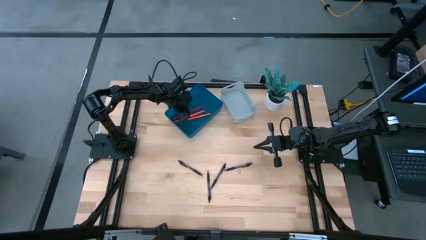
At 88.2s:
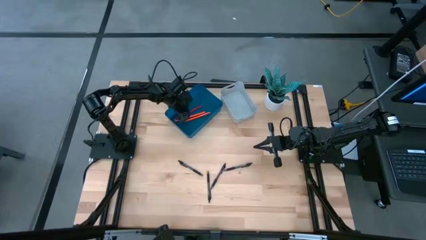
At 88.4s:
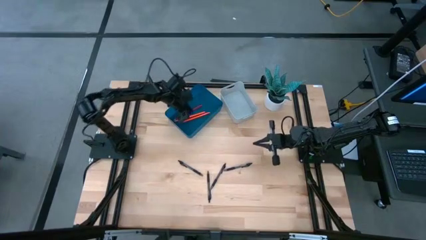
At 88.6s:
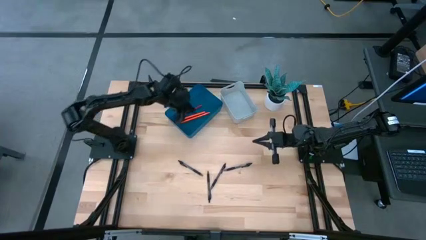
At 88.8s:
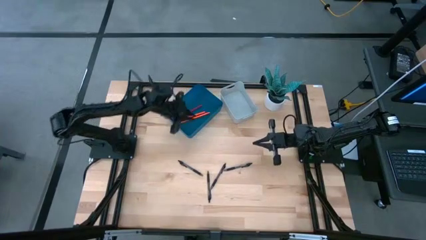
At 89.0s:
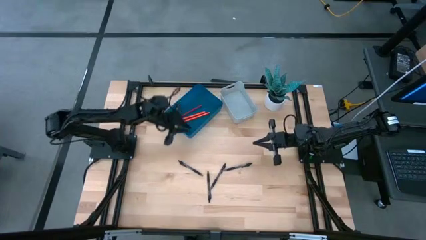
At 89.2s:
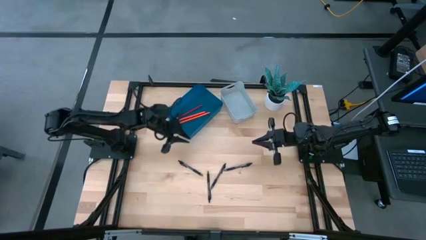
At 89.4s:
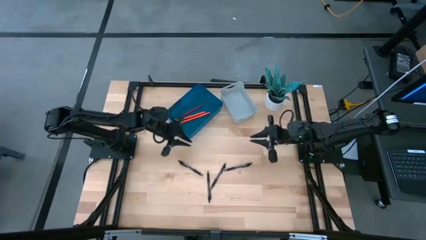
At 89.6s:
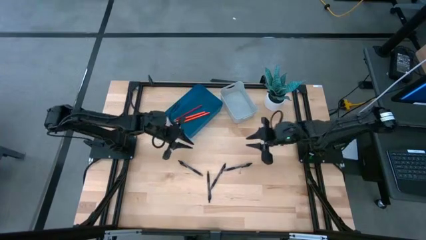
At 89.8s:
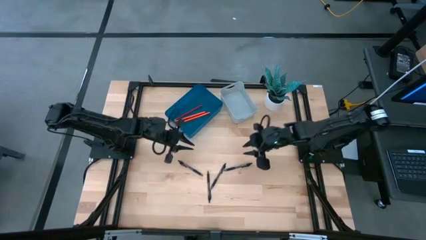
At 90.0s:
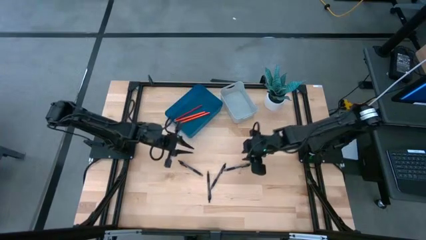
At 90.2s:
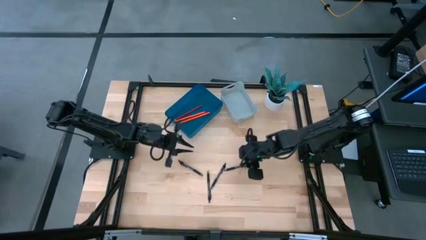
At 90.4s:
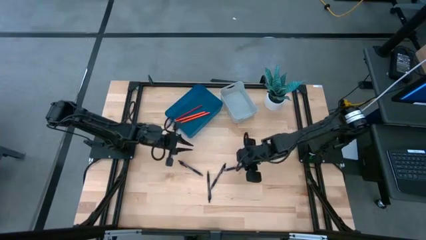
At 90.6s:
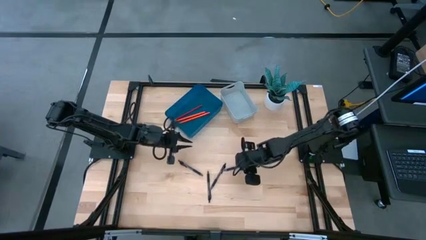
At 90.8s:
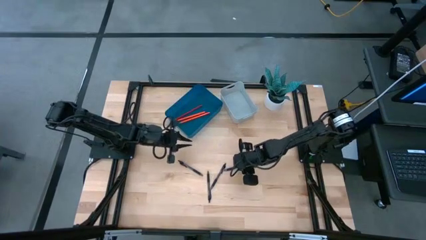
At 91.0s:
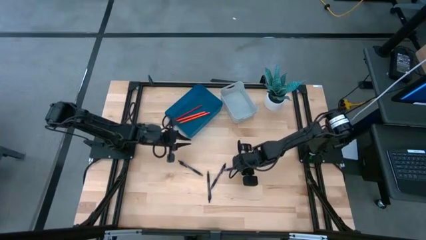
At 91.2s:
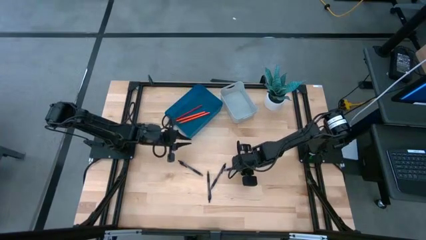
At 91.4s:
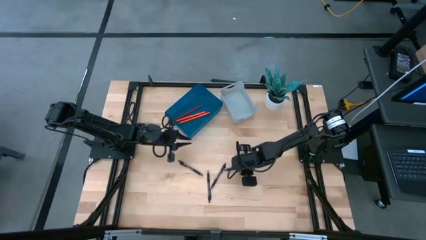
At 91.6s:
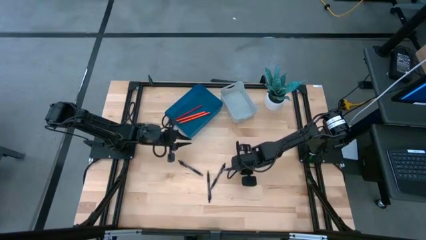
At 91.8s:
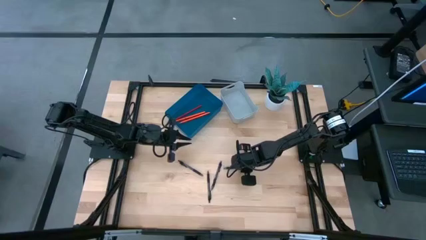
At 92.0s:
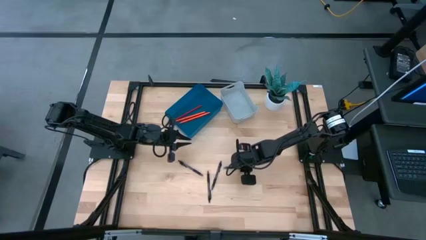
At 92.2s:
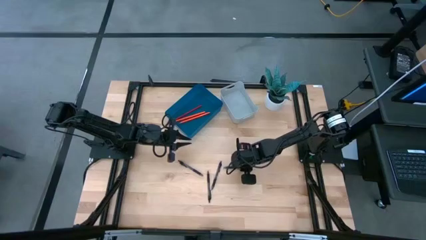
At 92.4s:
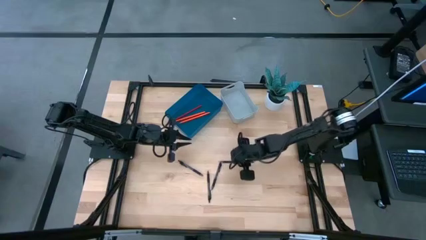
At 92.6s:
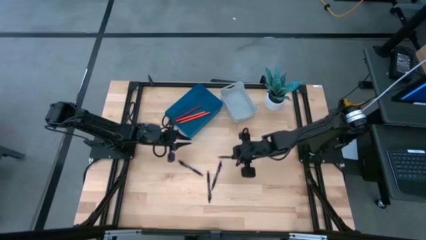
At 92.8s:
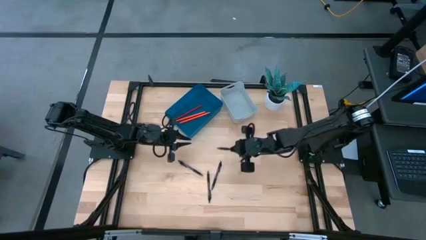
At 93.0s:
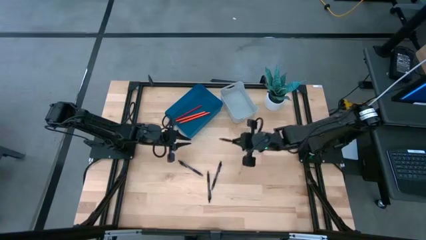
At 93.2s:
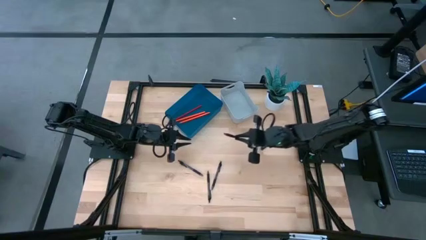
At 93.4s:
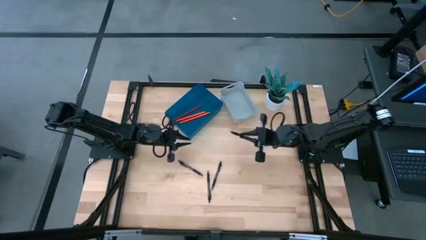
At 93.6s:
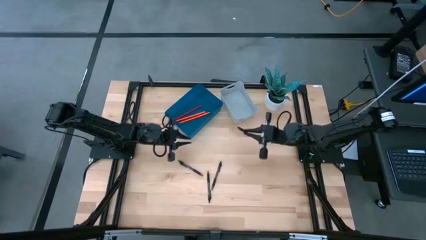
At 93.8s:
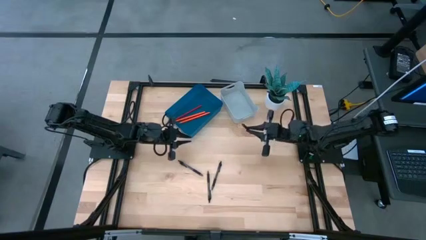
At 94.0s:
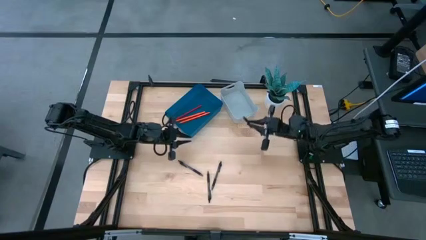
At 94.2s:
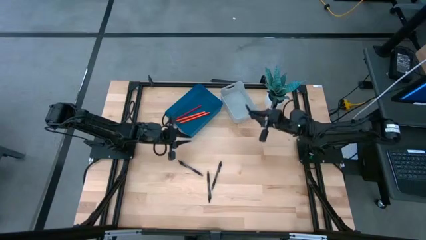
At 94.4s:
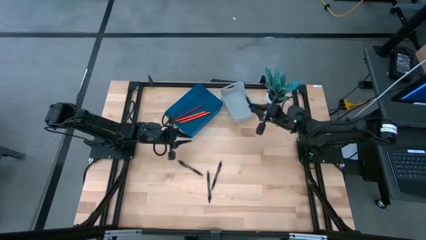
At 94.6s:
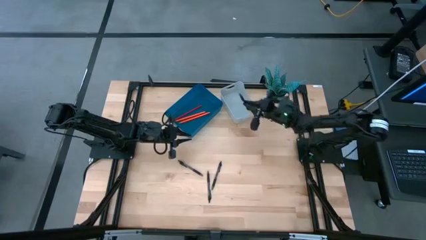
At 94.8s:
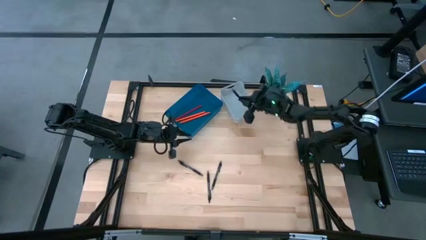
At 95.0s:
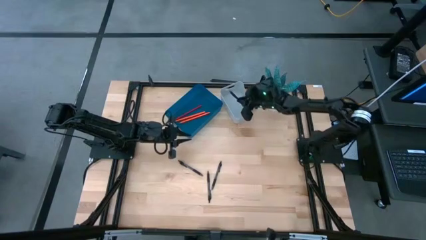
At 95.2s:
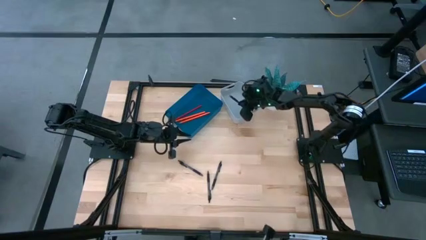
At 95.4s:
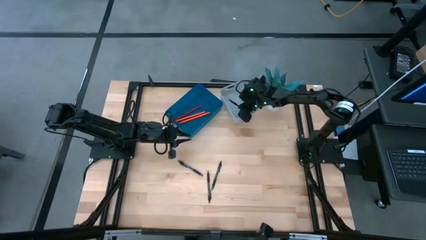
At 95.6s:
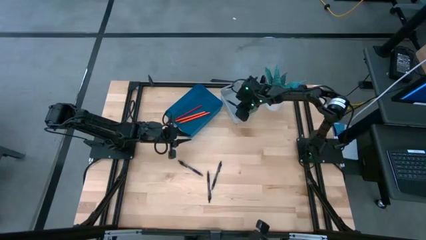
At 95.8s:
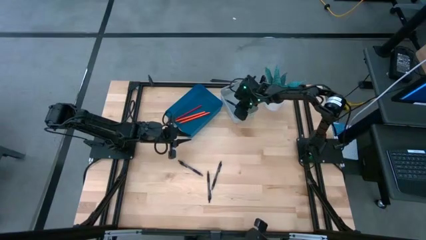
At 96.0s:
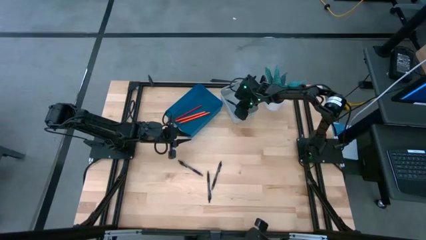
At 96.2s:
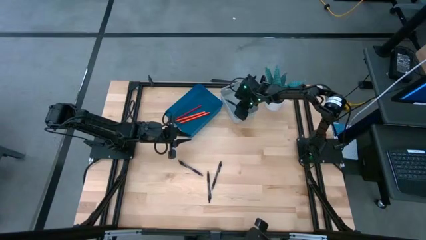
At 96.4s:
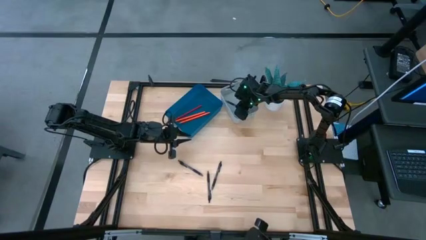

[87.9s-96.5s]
Task: Sort pens & pencils
Put the black pen into the gray bin

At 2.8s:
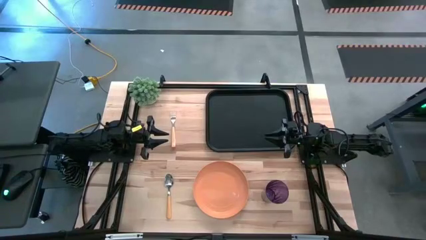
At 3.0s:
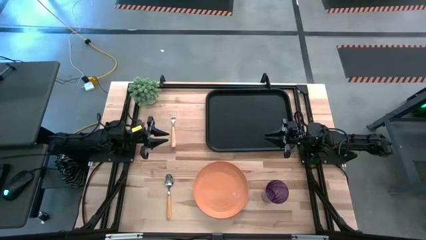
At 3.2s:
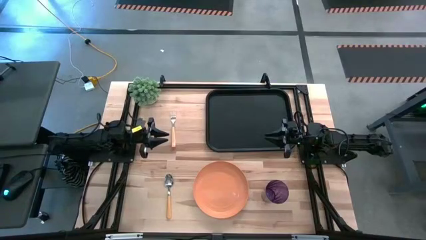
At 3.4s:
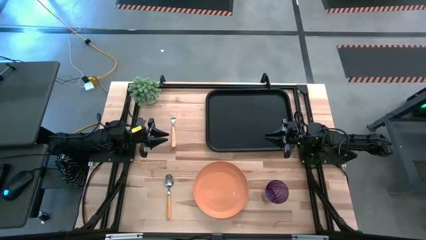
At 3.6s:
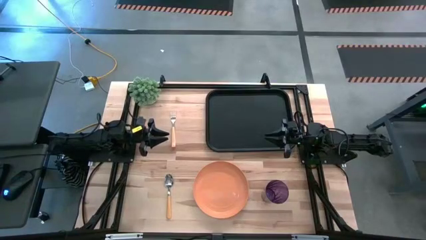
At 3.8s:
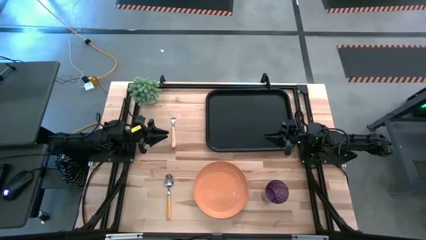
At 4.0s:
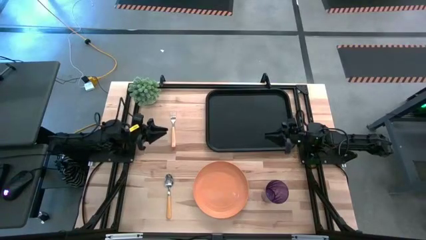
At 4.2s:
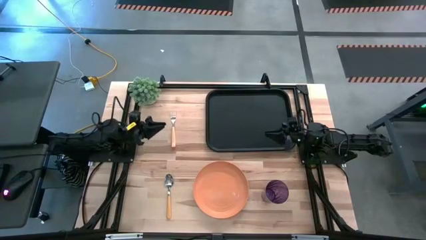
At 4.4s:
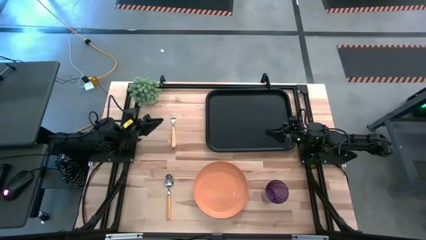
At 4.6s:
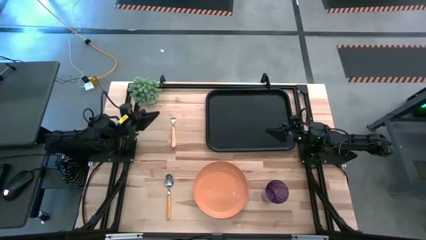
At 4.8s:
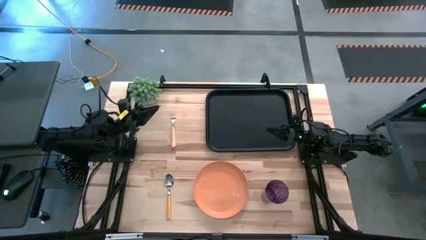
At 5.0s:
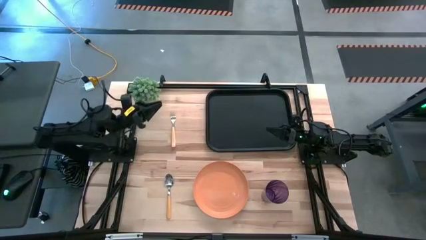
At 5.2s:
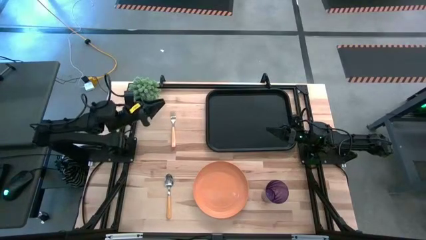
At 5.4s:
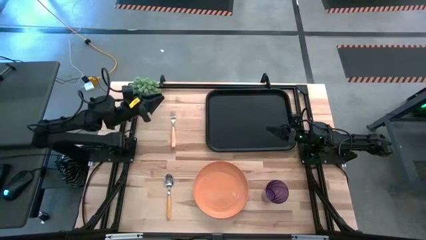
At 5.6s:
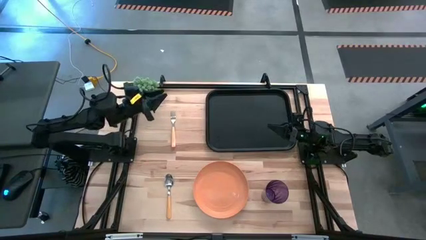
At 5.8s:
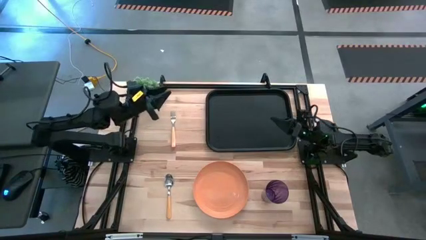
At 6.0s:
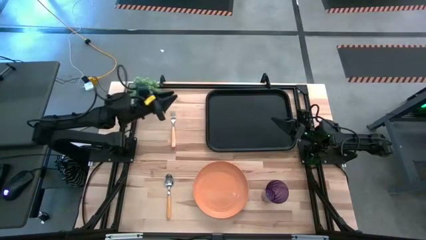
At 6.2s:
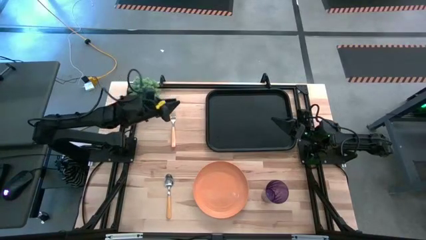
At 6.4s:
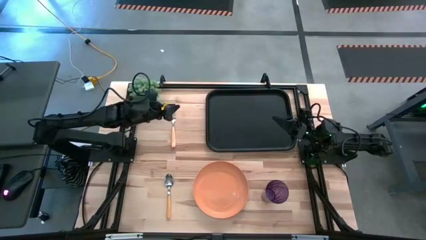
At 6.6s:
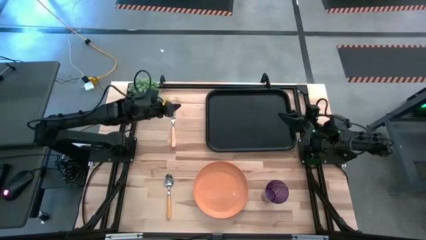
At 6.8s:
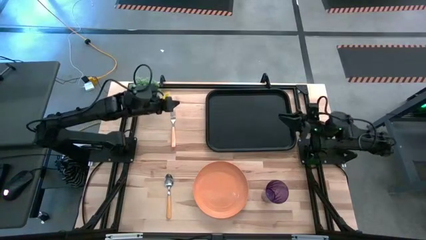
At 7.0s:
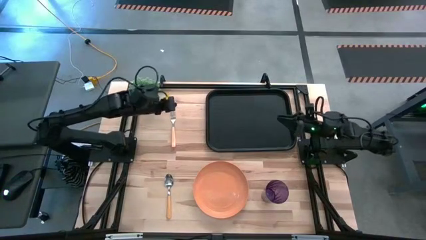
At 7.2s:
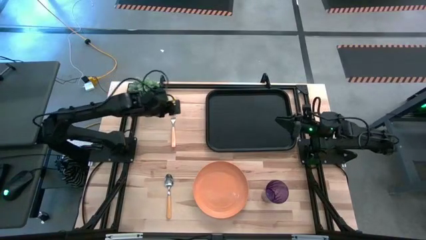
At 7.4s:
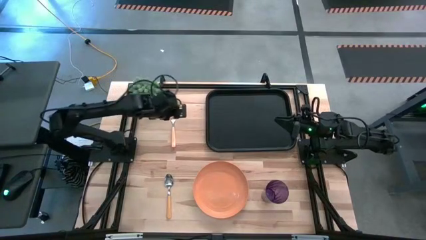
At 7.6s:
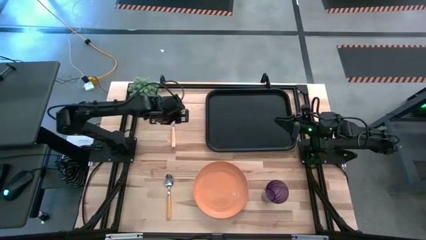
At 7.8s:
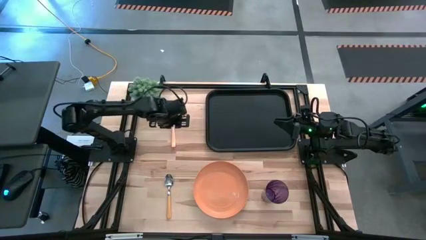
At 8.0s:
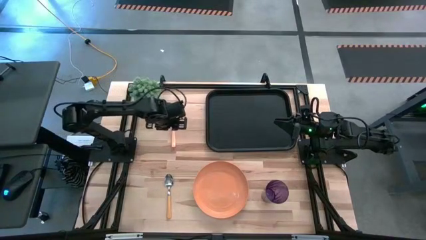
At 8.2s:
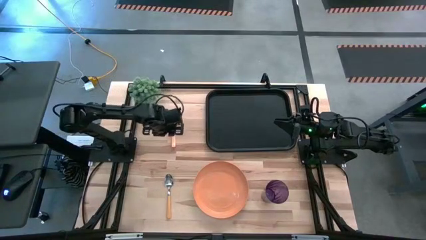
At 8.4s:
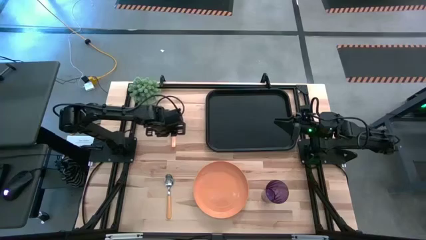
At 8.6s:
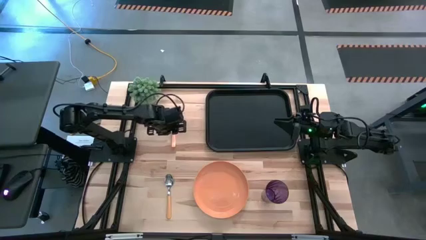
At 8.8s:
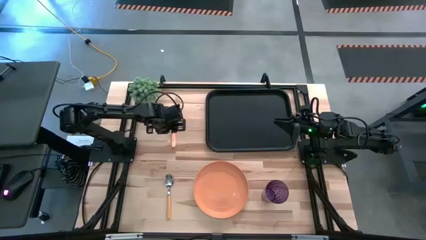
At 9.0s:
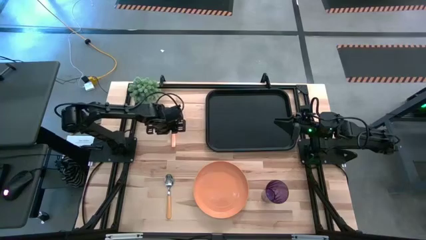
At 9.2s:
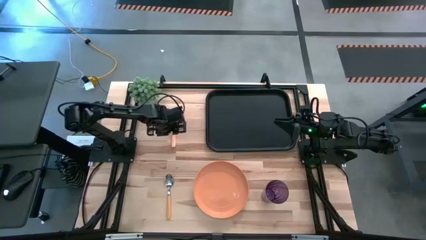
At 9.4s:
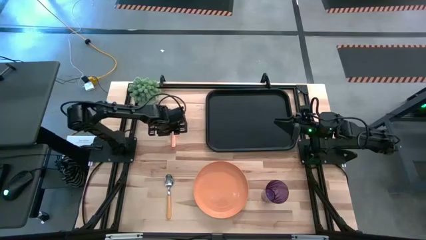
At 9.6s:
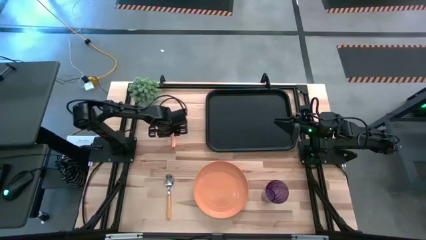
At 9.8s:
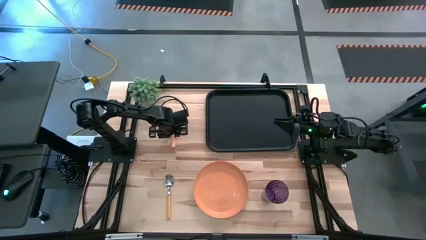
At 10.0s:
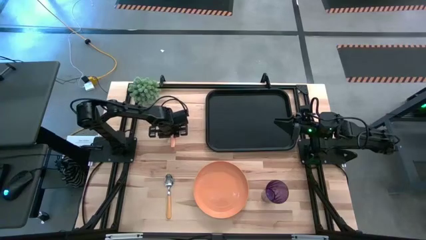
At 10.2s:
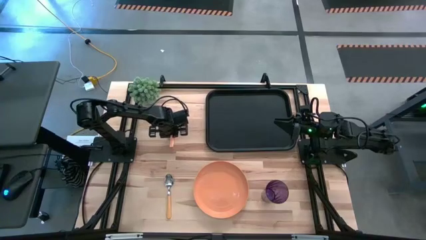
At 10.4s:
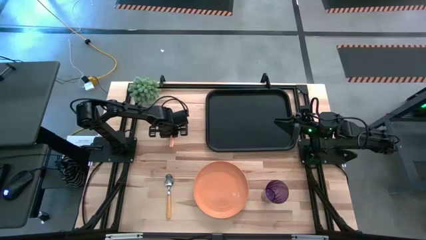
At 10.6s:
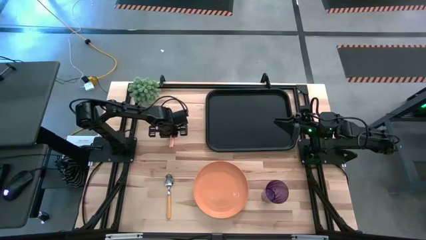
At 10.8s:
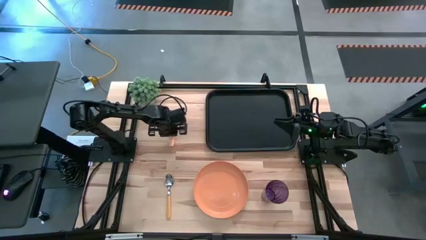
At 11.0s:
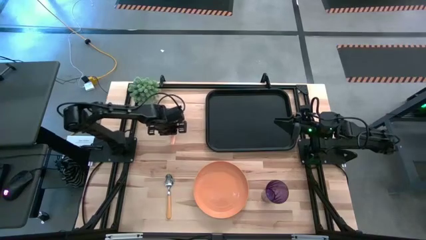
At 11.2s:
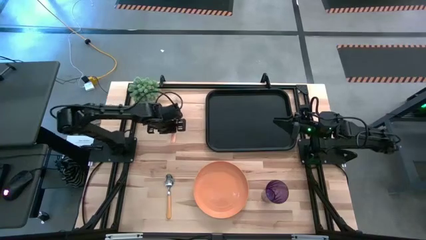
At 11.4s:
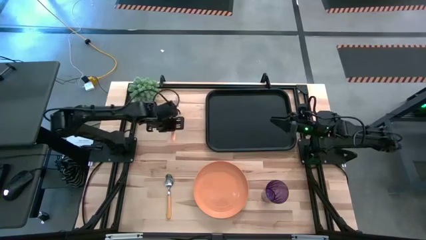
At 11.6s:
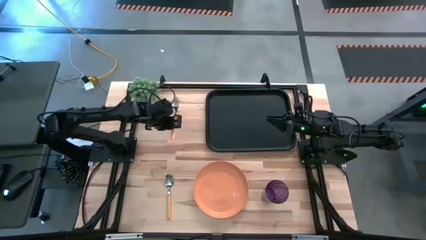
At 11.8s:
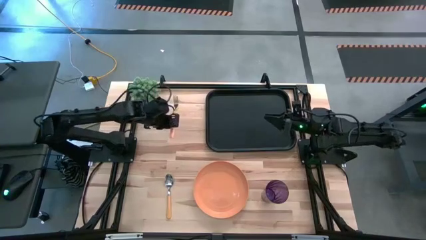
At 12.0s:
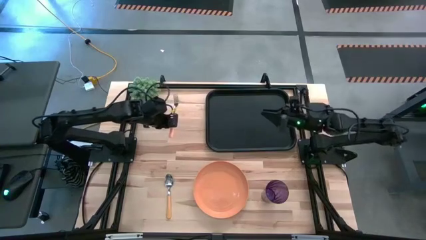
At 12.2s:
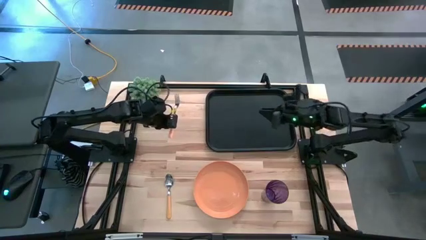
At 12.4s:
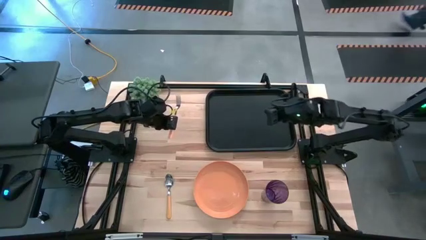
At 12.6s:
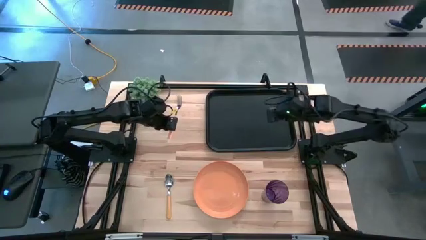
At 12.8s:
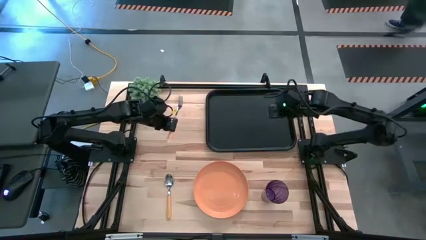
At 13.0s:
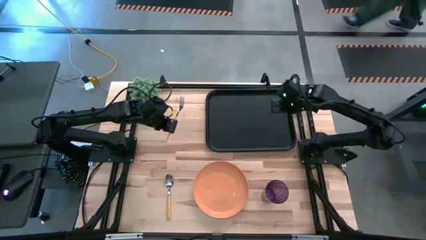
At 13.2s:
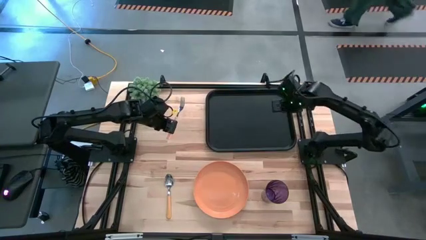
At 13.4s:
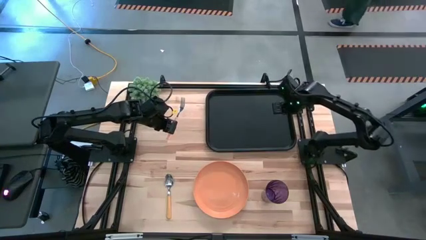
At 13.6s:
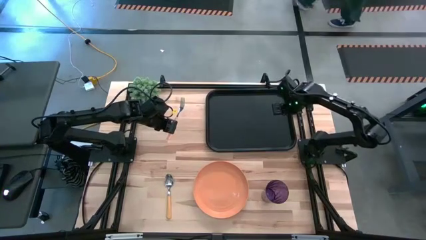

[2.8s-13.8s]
Task: Pick and place plate/cup/fork/spoon on tray
Put the yellow fork on the black serving tray
